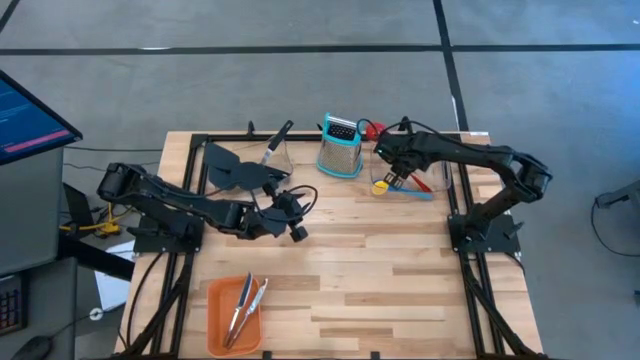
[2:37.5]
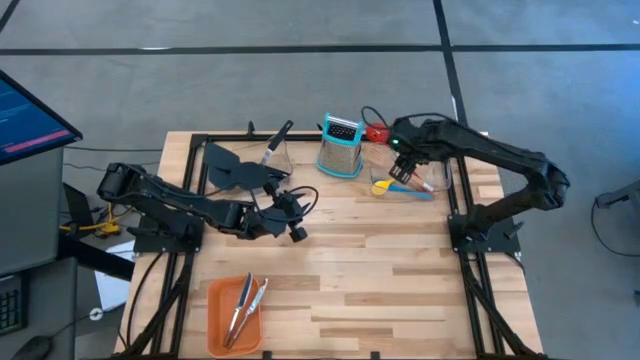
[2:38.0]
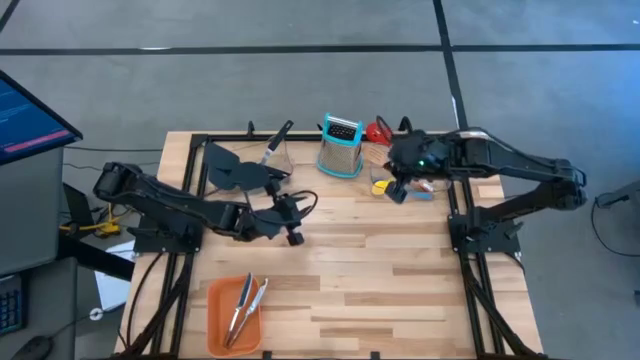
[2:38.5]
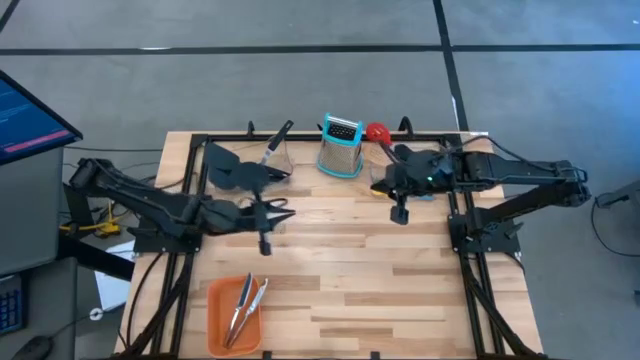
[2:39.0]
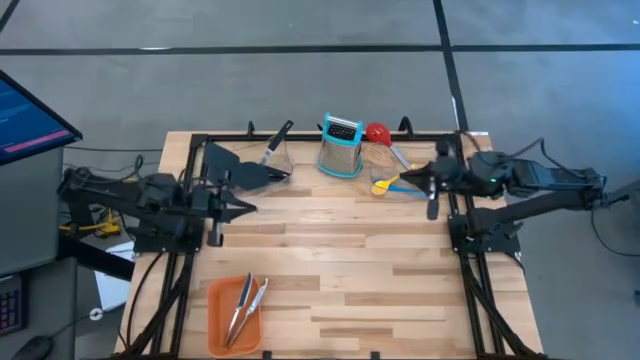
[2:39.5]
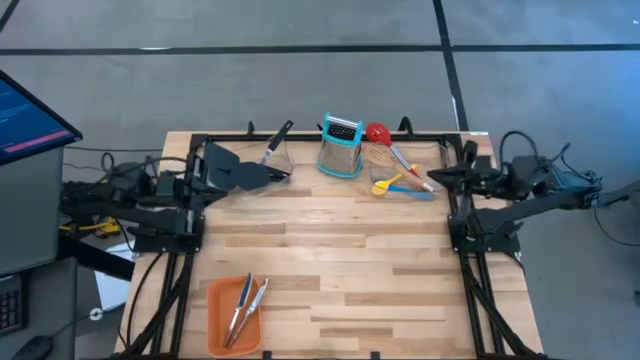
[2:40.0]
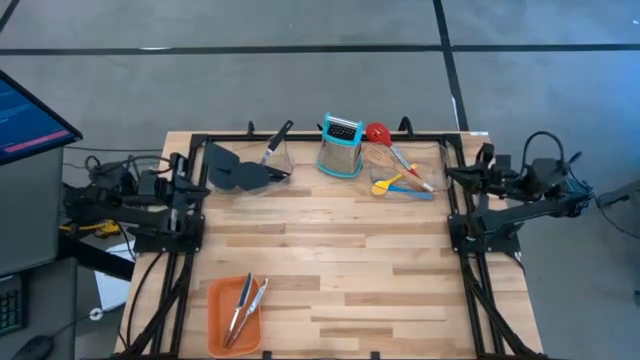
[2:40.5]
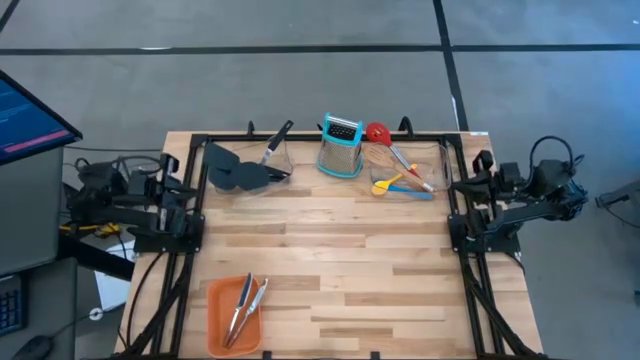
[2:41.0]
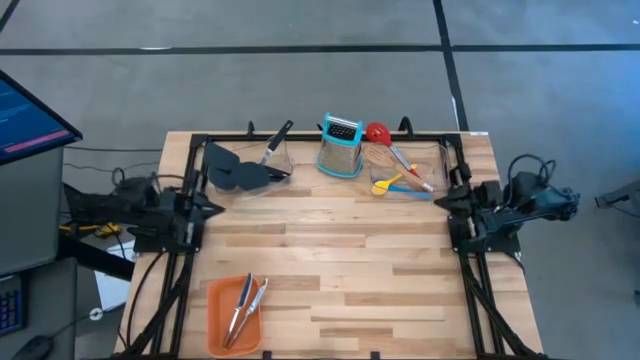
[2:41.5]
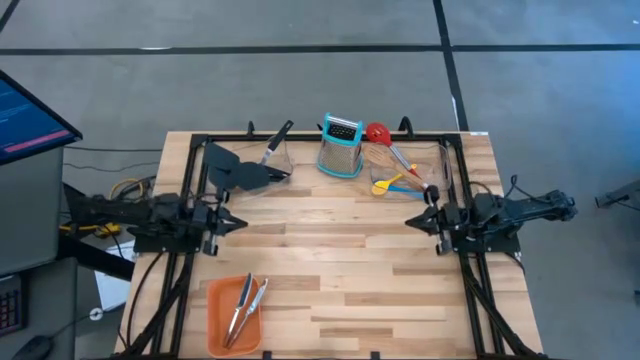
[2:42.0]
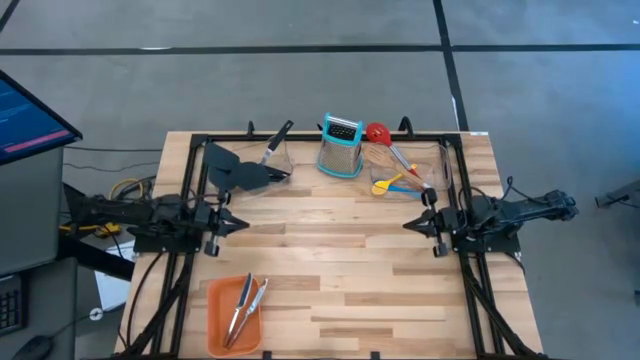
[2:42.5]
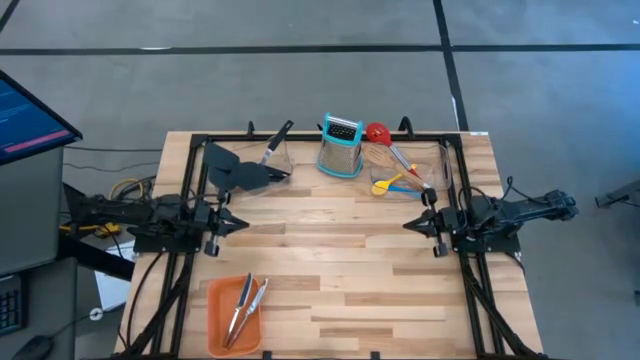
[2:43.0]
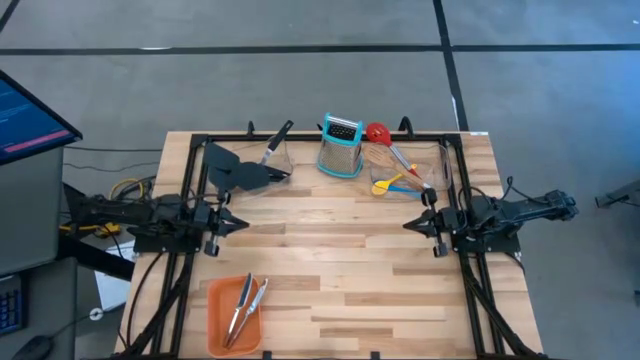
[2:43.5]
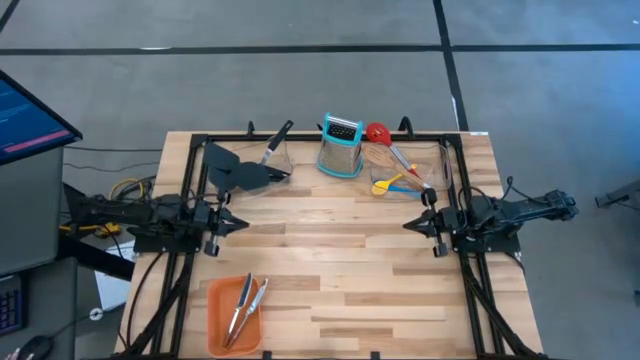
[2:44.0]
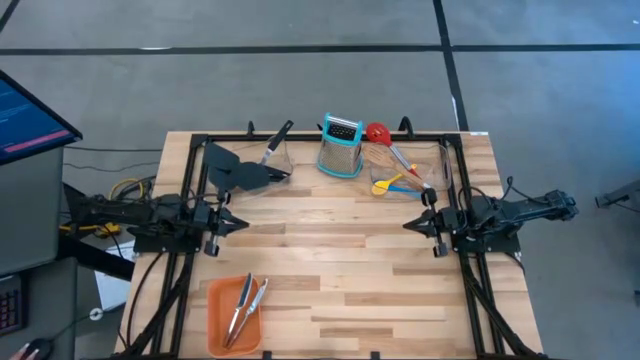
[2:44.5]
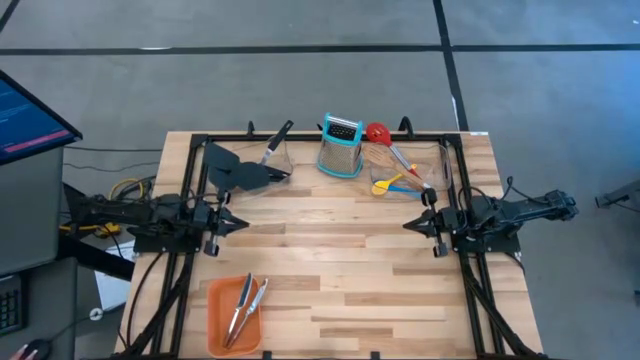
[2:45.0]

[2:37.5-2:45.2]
Task: Pick & Place Kitchen Items
Return to Home Position

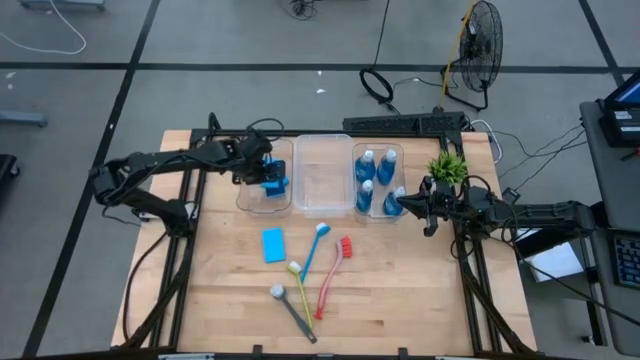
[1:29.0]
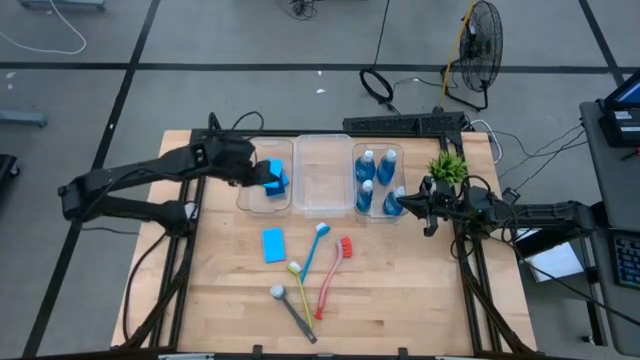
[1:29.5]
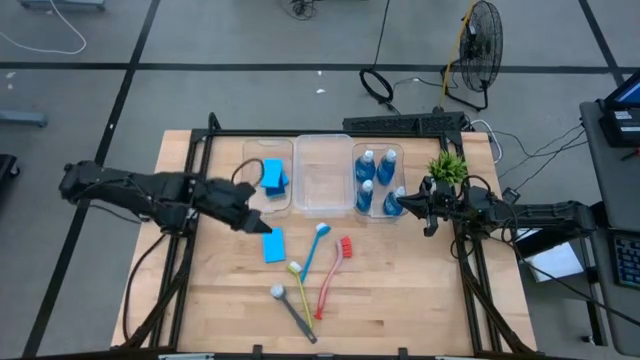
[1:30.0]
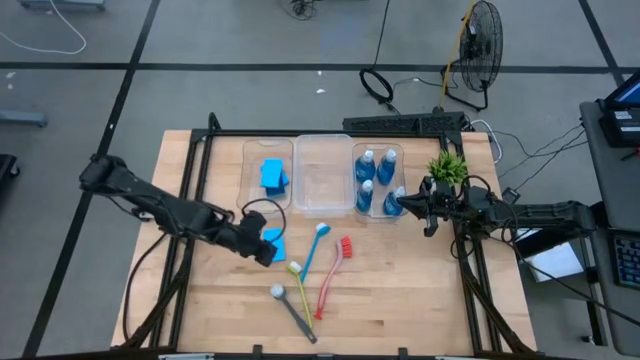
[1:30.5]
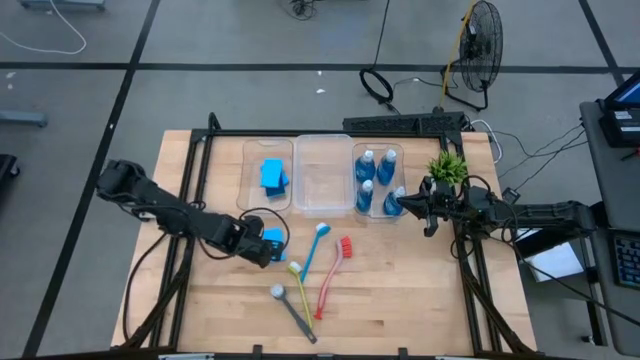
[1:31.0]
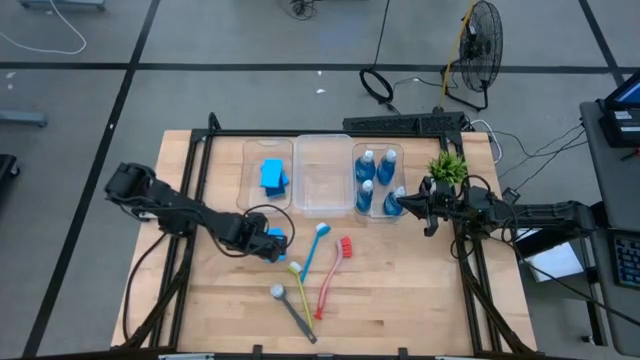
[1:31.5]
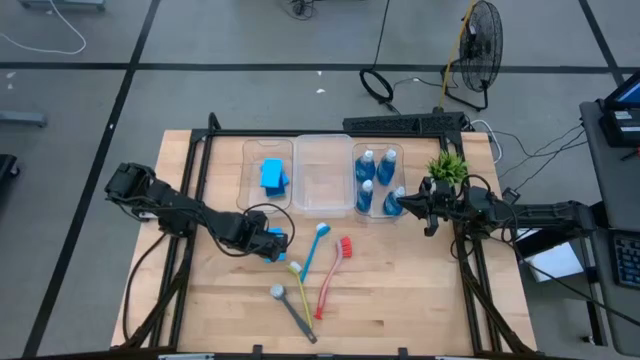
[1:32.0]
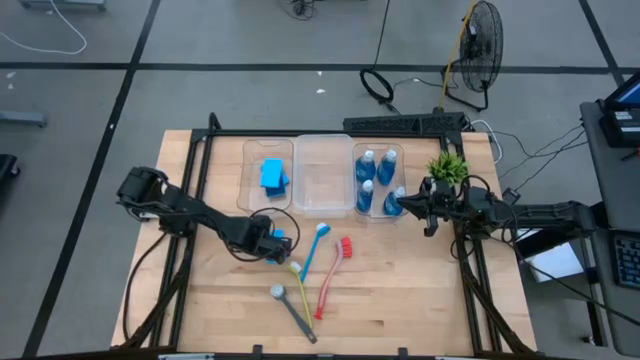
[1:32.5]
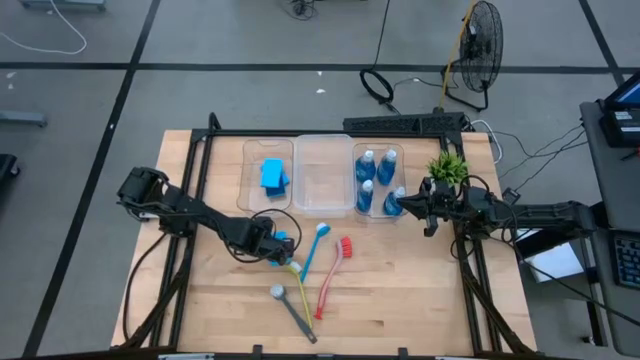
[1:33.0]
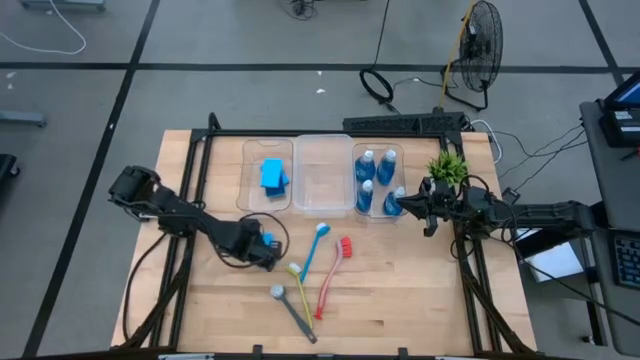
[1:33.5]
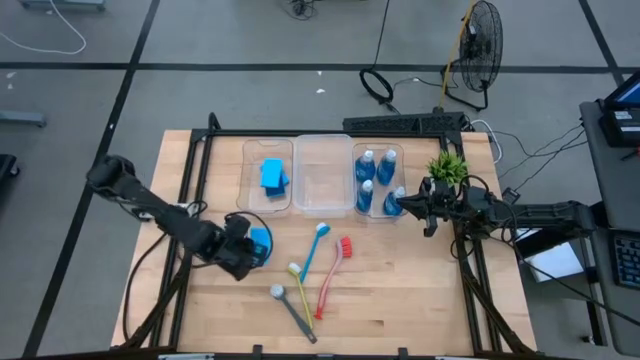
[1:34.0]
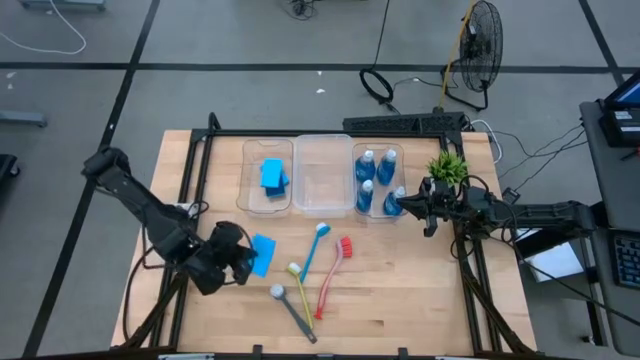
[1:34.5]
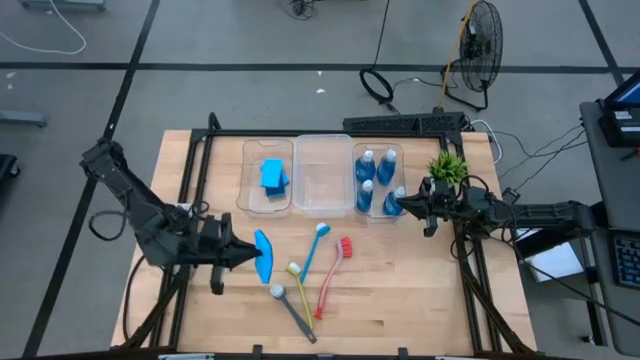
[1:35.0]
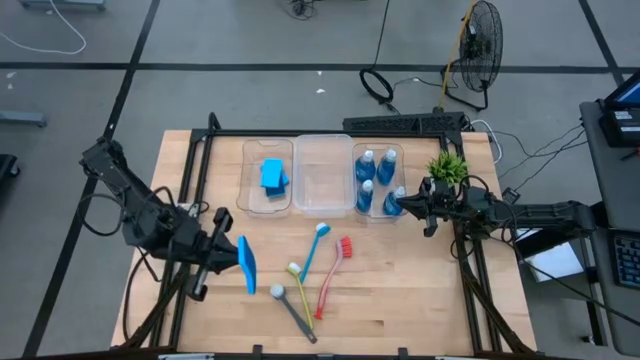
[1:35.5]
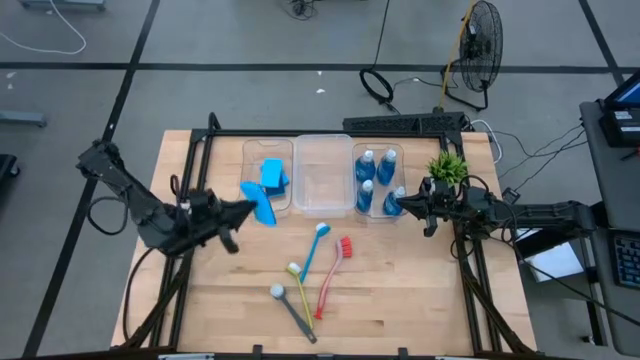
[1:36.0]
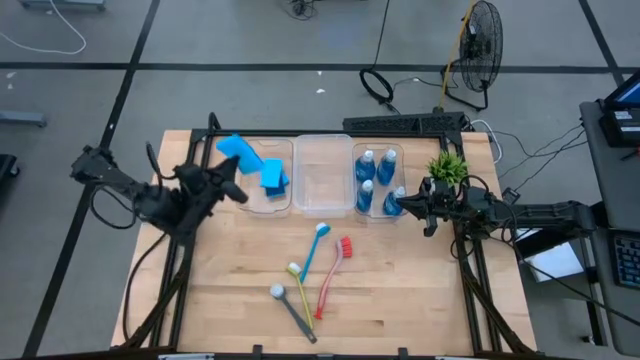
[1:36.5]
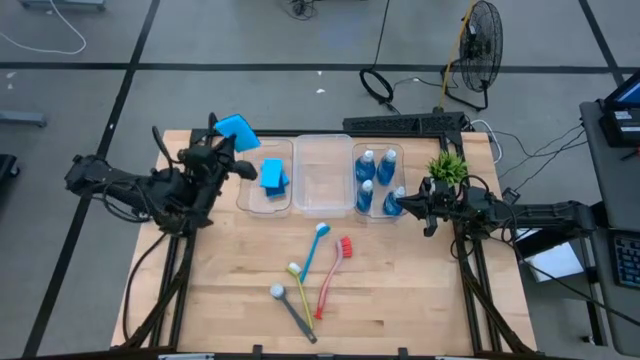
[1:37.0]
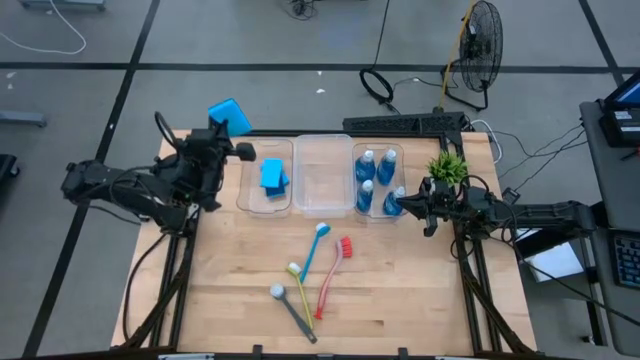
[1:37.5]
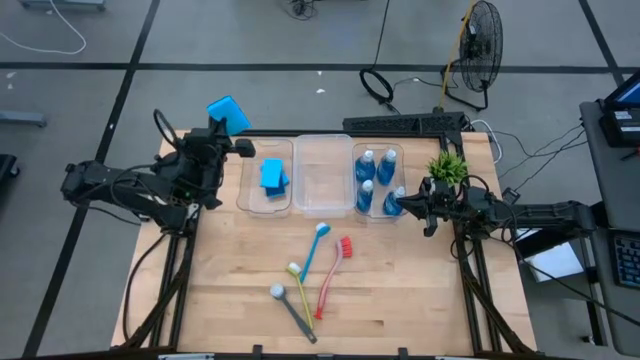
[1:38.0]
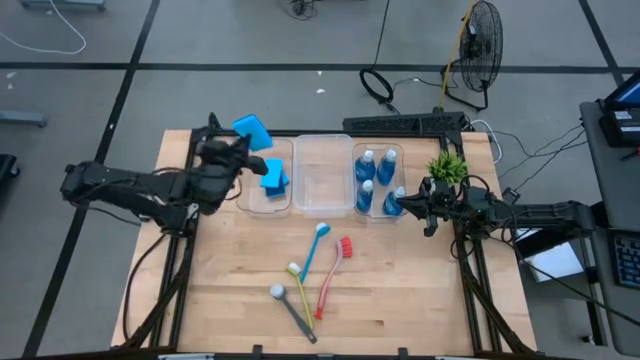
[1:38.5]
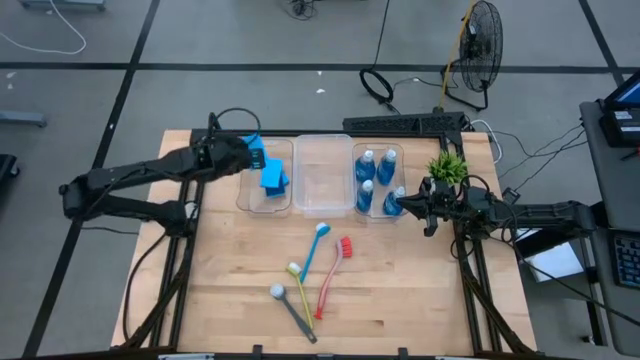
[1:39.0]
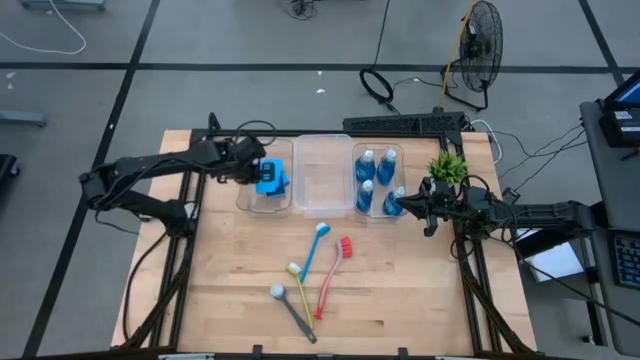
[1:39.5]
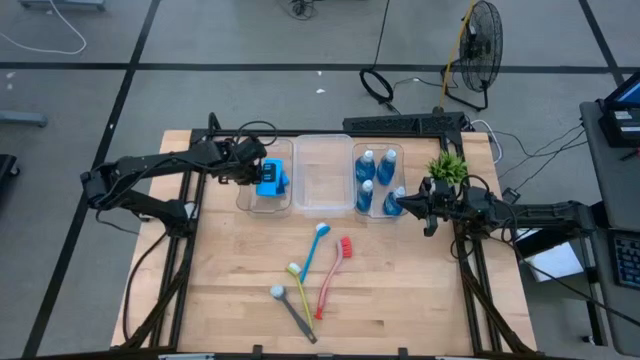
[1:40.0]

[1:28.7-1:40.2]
Task: Pick & Place Kitchen Sink Supplies
Put the blue sponge wipe into the left transparent bin
